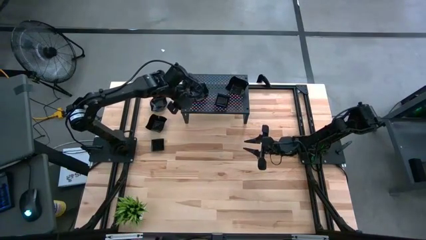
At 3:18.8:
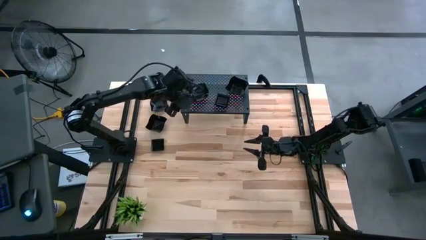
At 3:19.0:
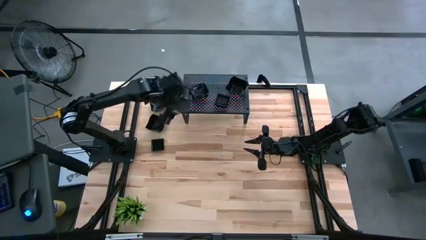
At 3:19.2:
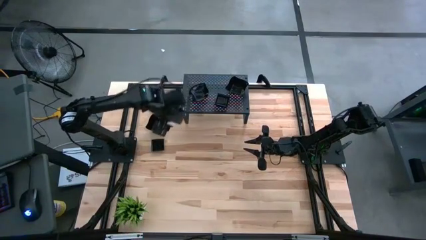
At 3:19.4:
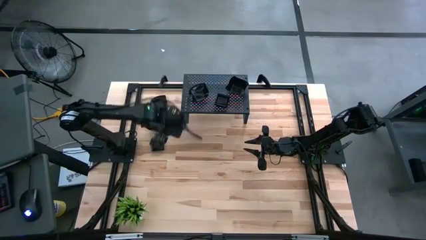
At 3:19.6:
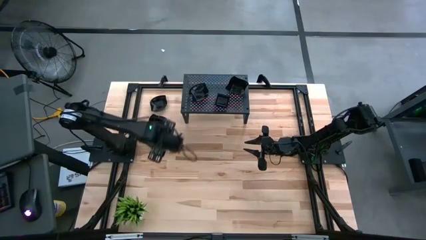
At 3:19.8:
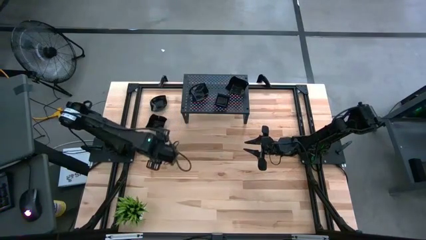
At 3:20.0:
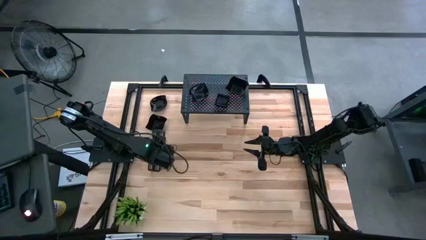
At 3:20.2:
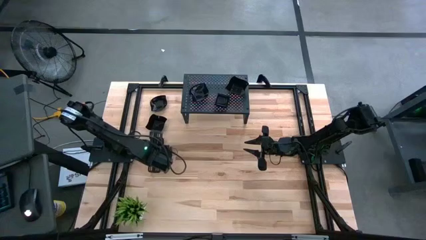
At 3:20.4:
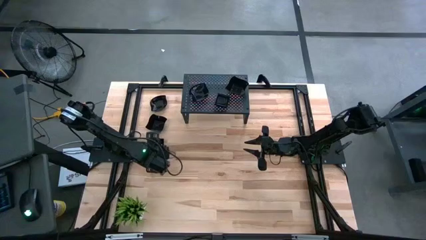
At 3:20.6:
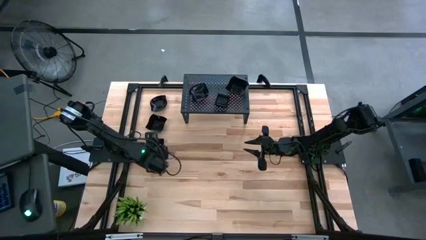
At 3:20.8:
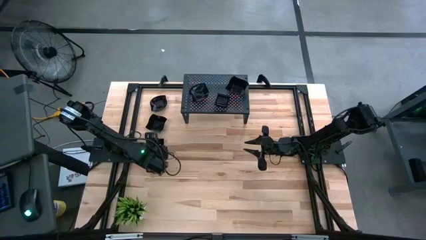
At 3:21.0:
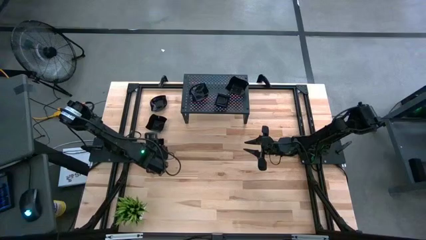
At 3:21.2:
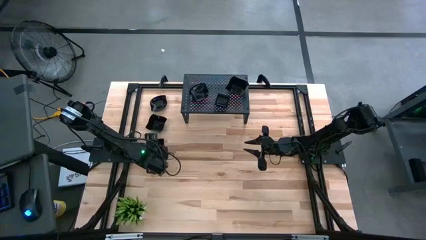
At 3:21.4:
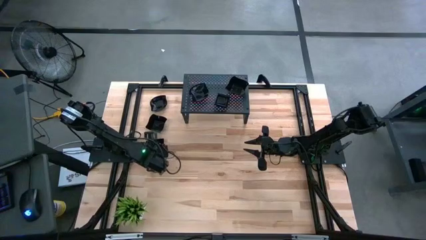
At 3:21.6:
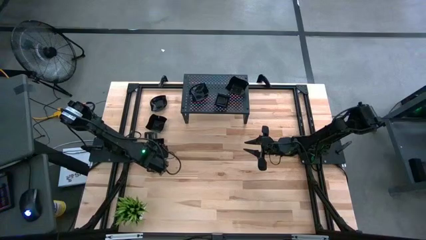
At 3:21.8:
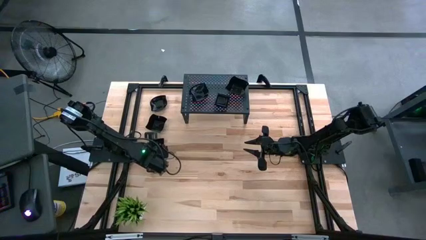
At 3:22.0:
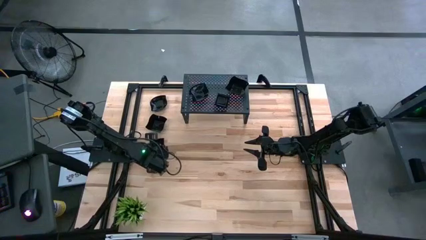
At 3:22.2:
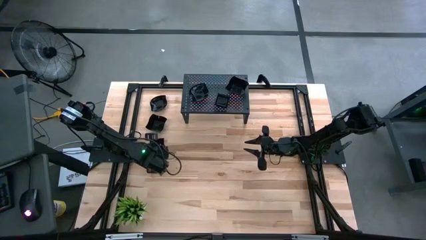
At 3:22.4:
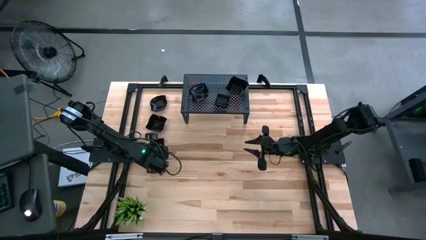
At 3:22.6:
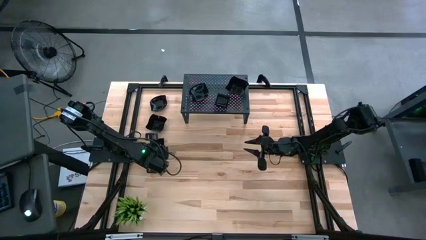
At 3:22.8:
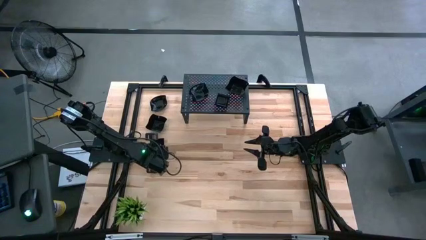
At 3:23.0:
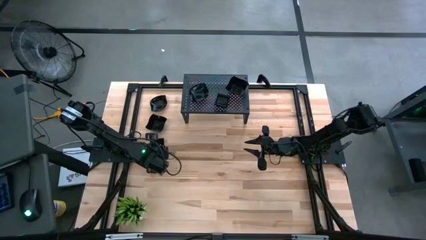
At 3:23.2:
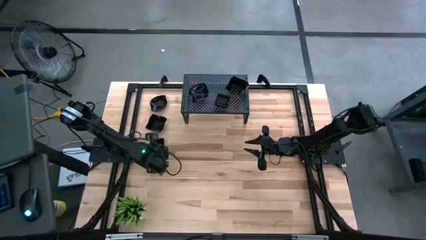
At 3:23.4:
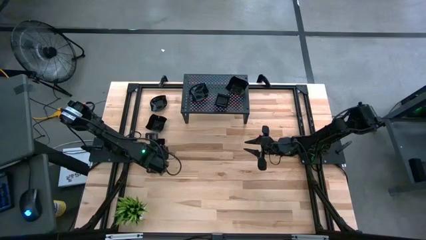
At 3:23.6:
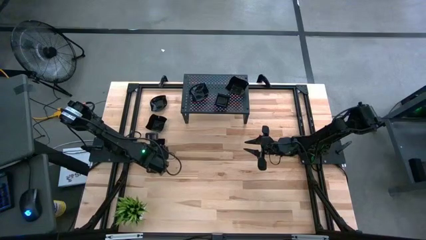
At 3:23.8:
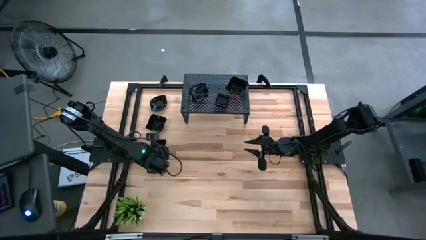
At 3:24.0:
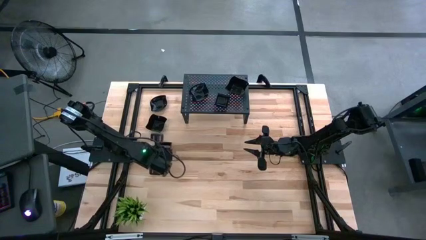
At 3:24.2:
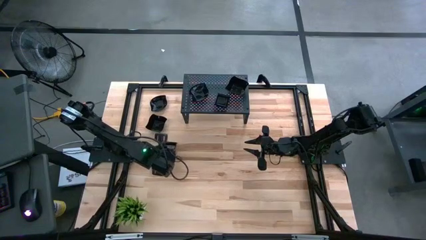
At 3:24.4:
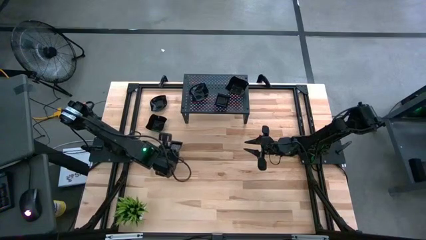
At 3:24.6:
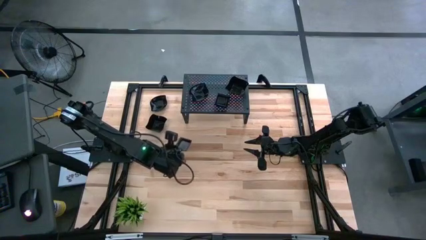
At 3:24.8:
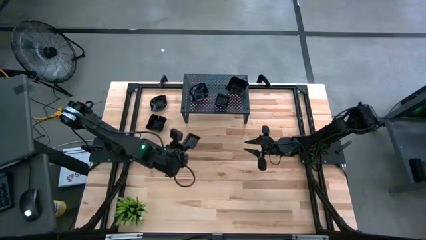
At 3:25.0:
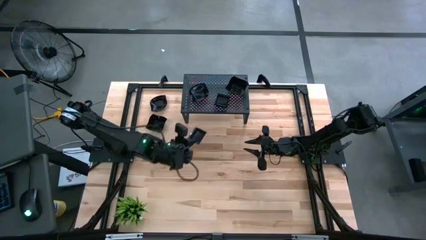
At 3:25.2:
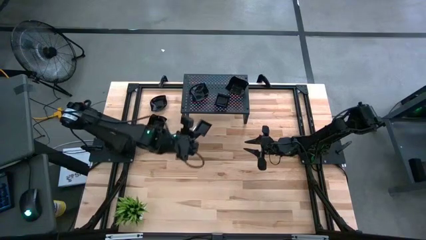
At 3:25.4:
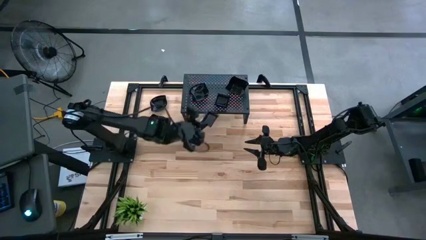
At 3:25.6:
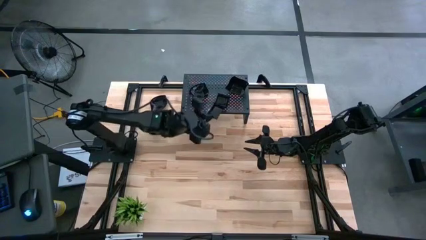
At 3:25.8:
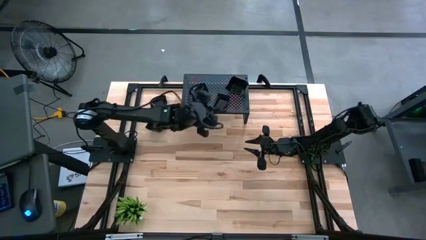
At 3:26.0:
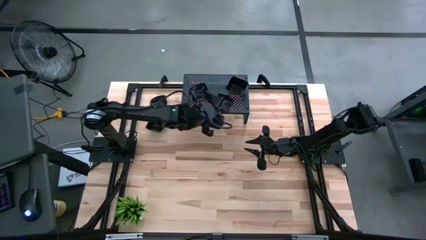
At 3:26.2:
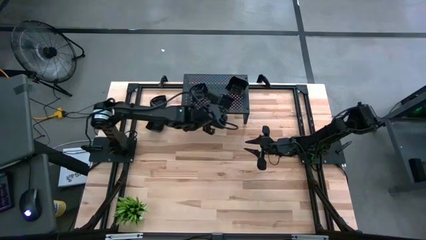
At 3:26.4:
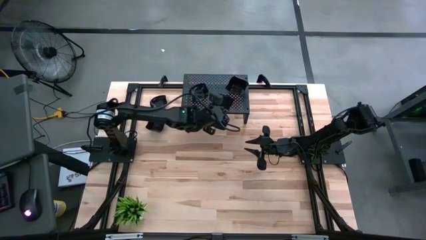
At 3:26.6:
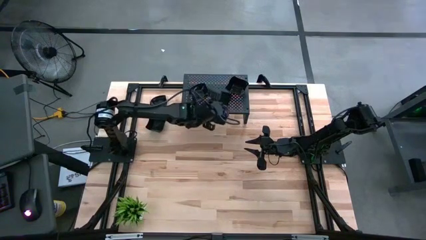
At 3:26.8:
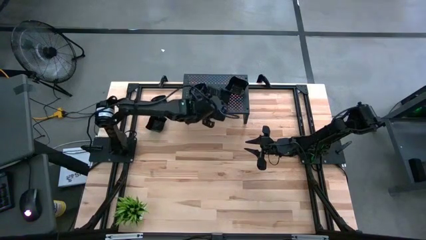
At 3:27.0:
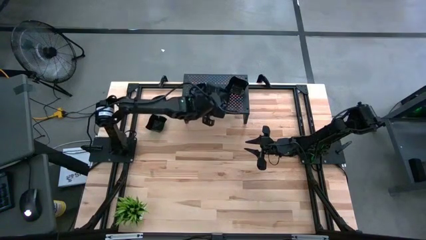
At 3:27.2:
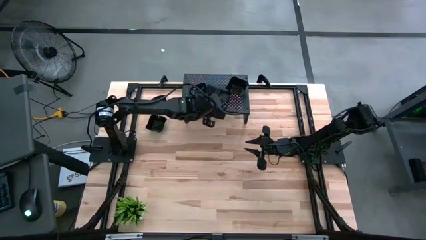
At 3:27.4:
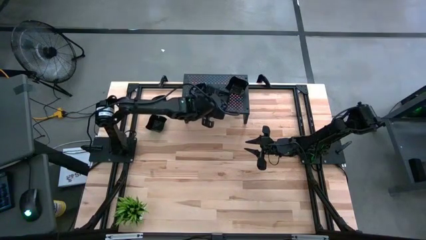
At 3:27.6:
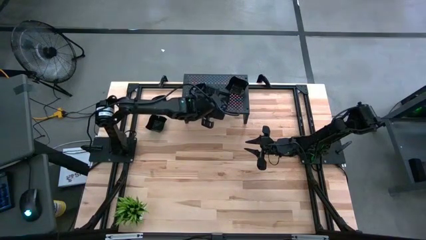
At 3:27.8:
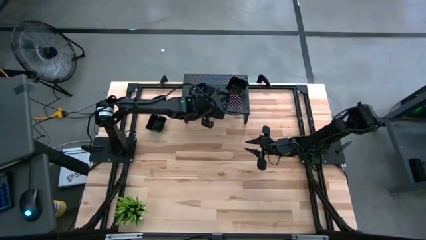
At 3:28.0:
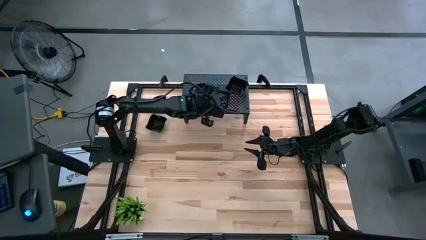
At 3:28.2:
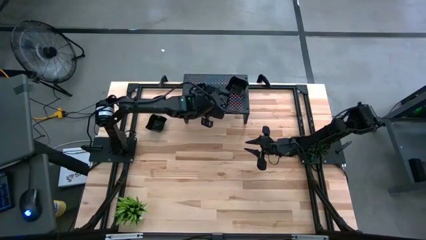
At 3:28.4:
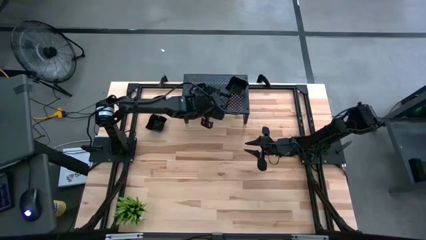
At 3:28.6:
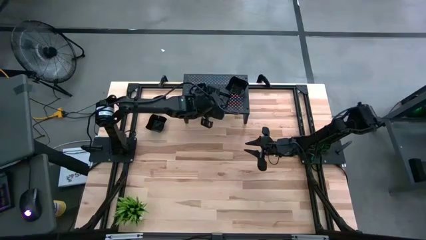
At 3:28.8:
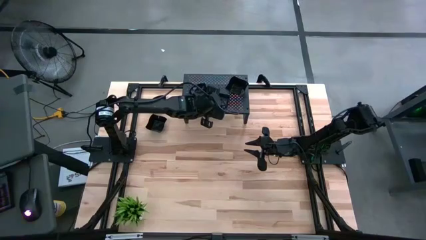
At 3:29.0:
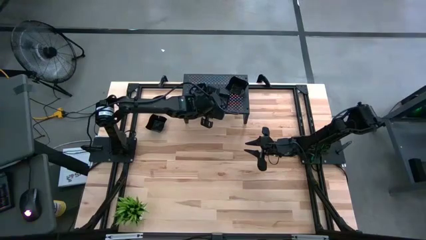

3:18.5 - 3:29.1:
Task: Pick & Place Mini shaped plates
Stack the black square plate on top of the black square plate on the shelf

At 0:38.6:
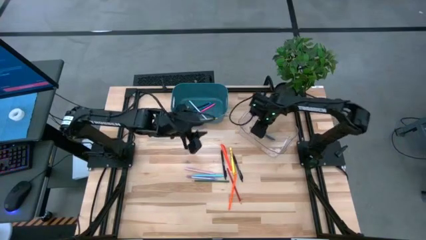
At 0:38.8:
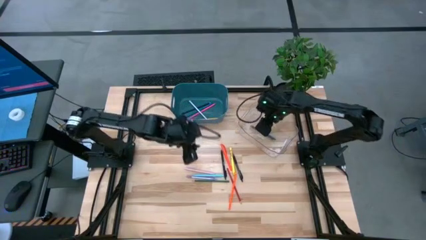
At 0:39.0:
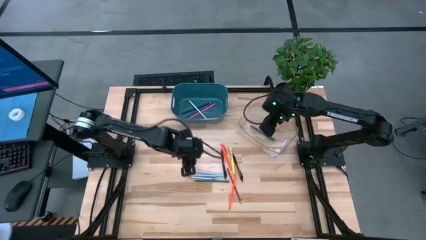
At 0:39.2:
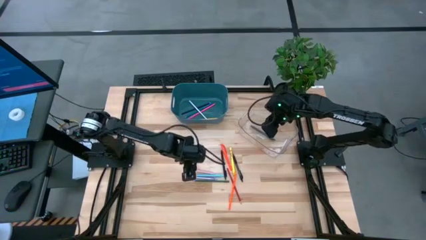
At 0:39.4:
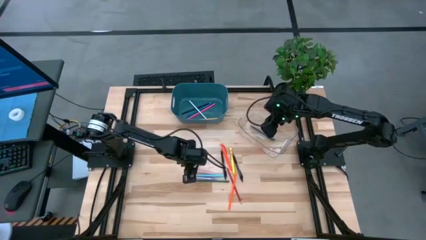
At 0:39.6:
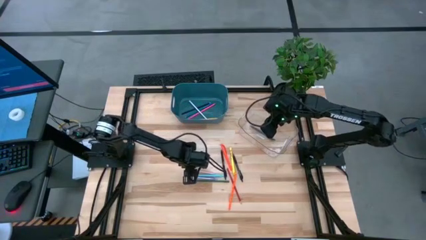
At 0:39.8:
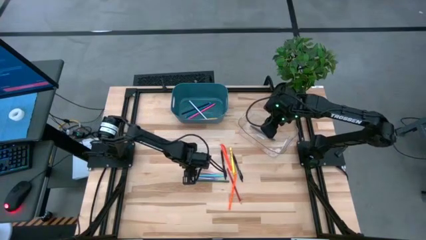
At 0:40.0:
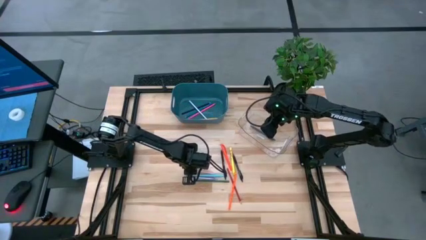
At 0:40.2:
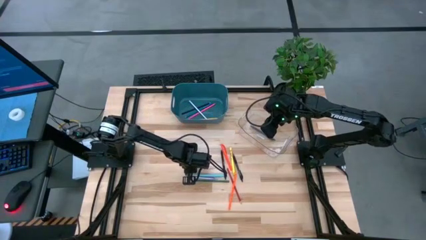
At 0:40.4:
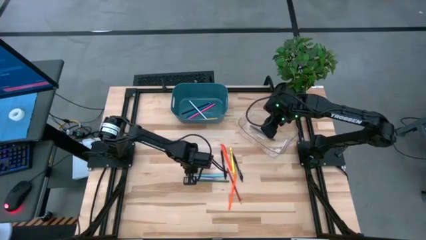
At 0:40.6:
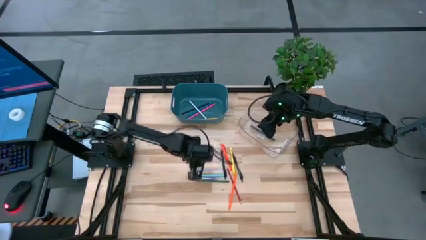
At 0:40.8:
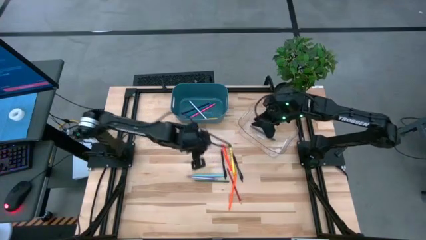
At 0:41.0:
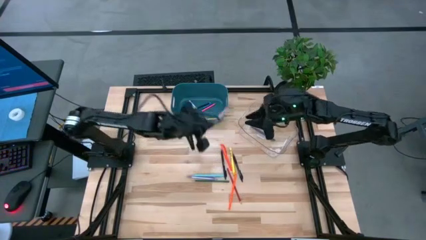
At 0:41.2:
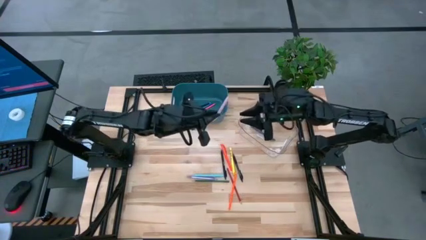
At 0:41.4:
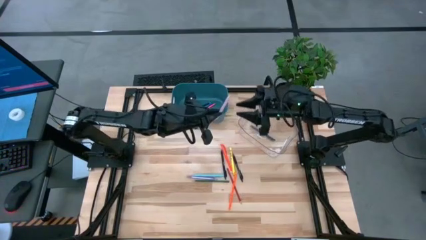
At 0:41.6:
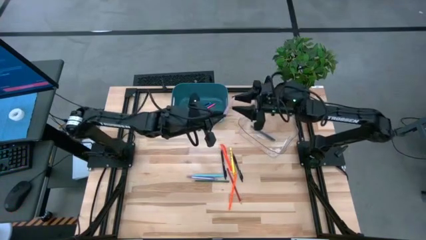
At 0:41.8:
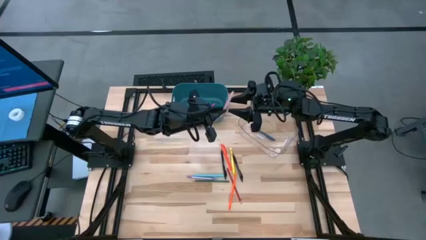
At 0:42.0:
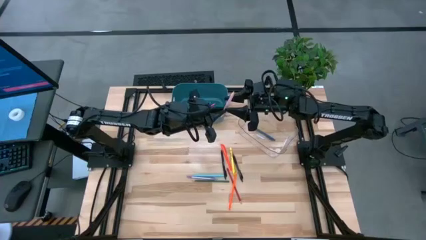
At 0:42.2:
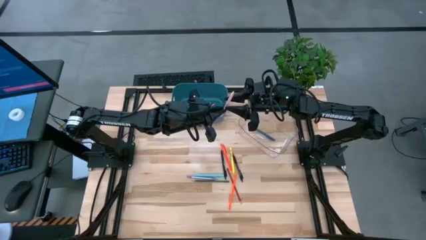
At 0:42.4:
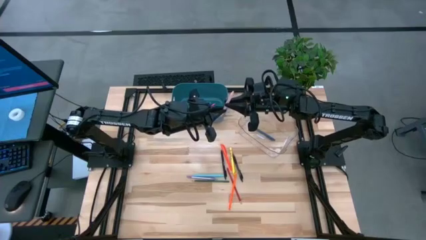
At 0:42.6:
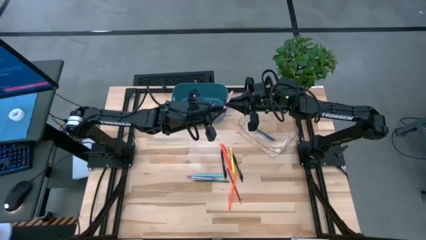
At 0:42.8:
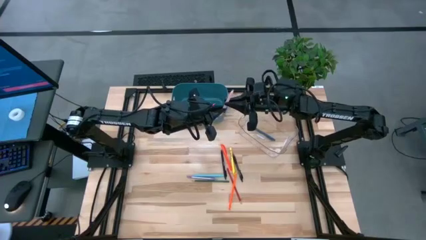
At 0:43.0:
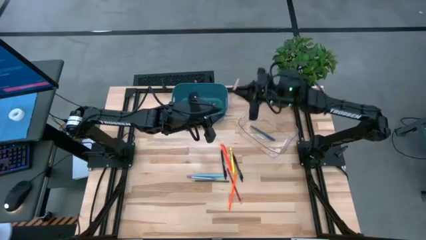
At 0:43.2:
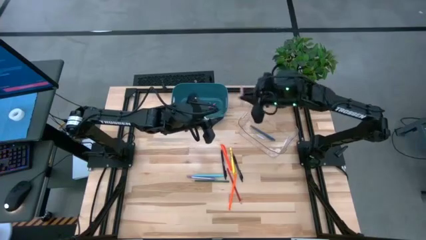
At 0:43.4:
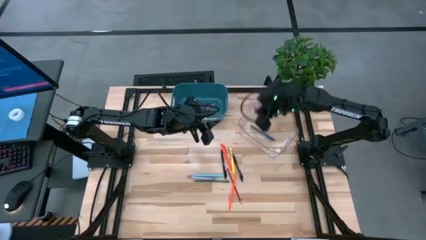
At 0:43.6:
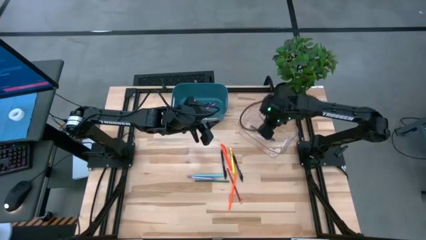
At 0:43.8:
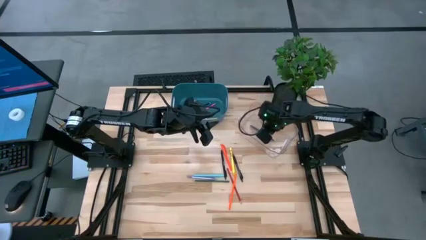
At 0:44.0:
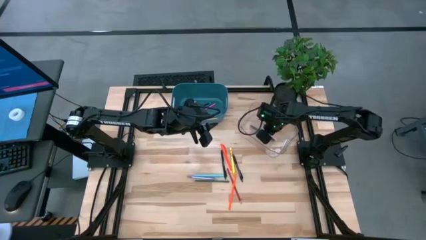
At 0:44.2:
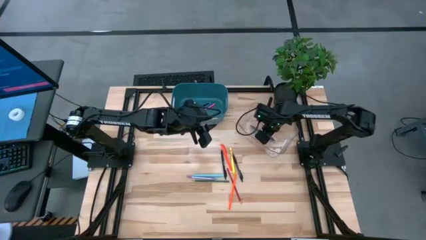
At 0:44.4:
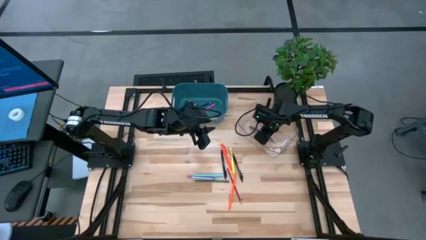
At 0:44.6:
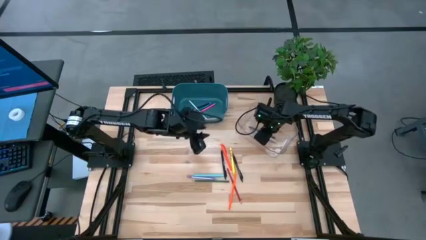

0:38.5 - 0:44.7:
Task: Sort pens & pencils
Put the pink pen into the transparent bin
